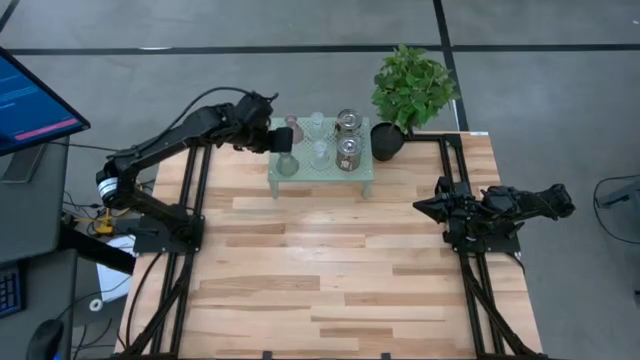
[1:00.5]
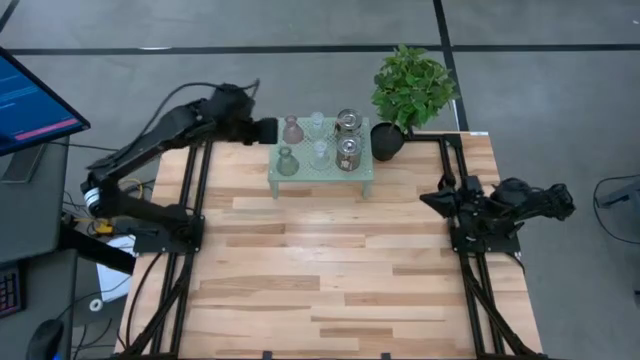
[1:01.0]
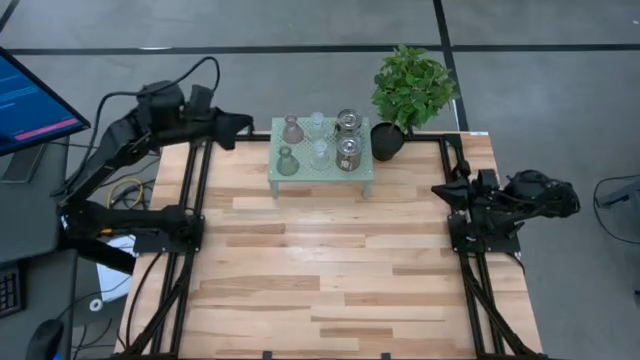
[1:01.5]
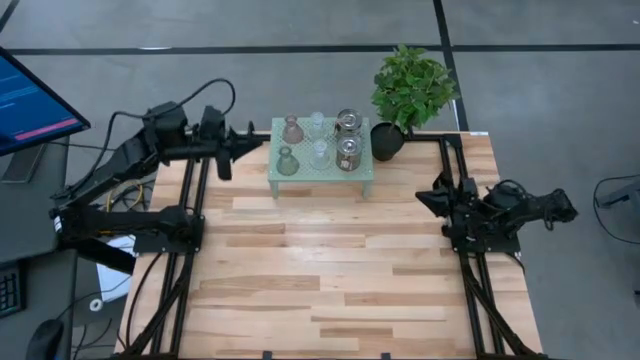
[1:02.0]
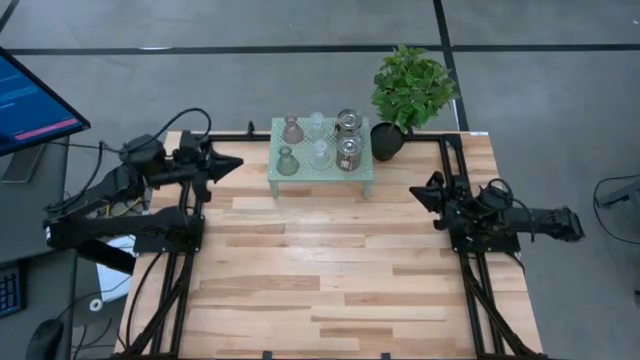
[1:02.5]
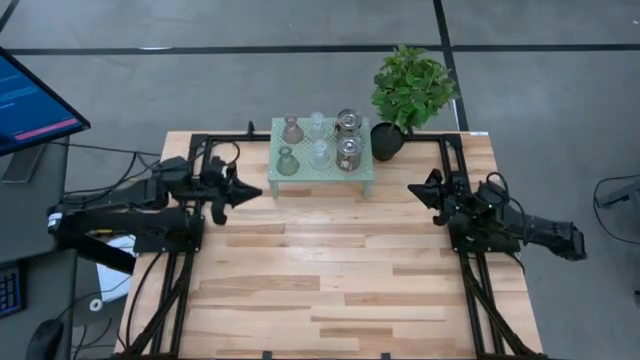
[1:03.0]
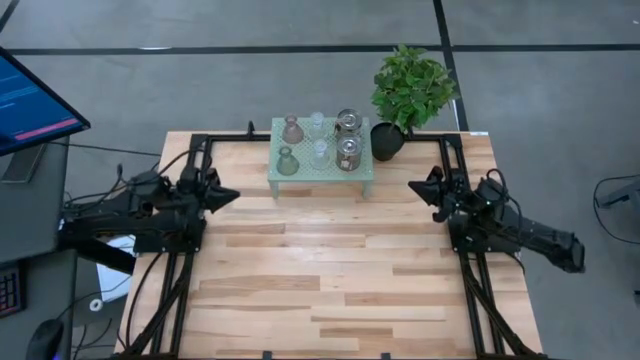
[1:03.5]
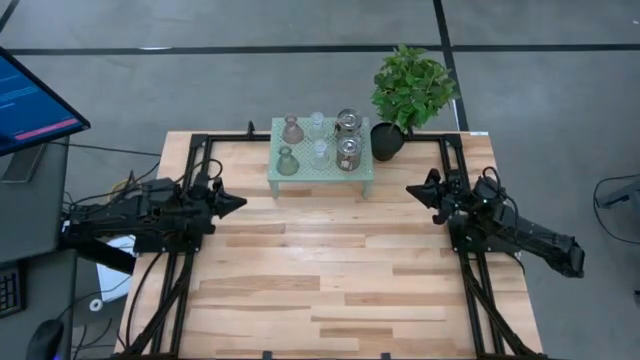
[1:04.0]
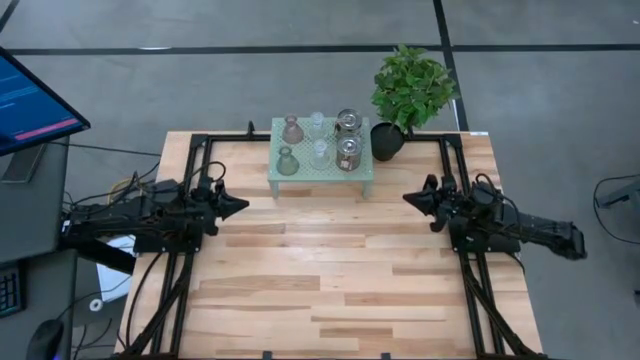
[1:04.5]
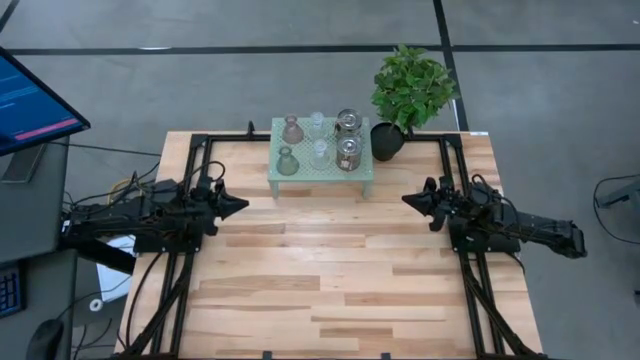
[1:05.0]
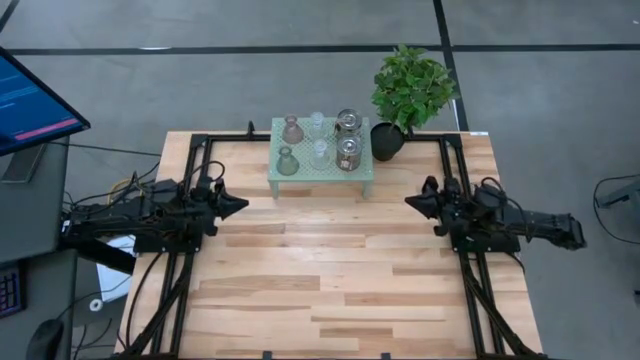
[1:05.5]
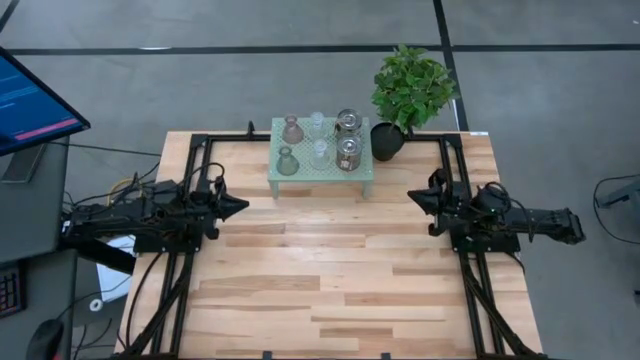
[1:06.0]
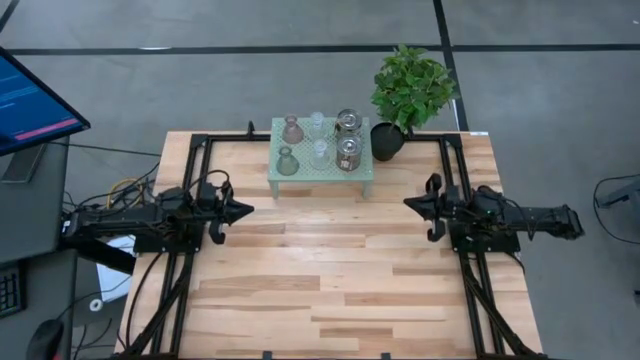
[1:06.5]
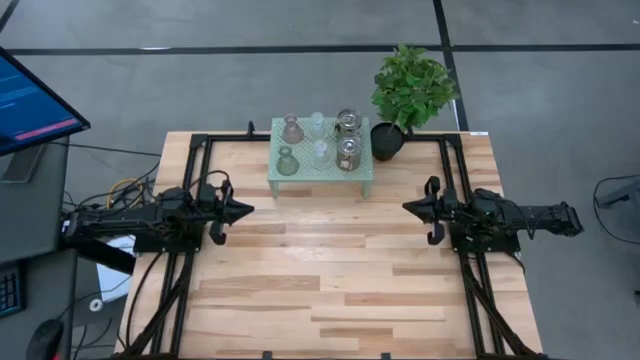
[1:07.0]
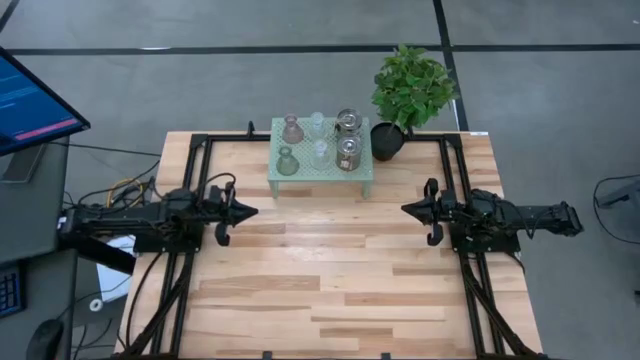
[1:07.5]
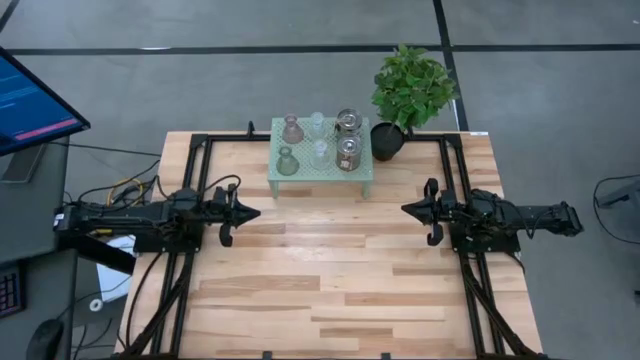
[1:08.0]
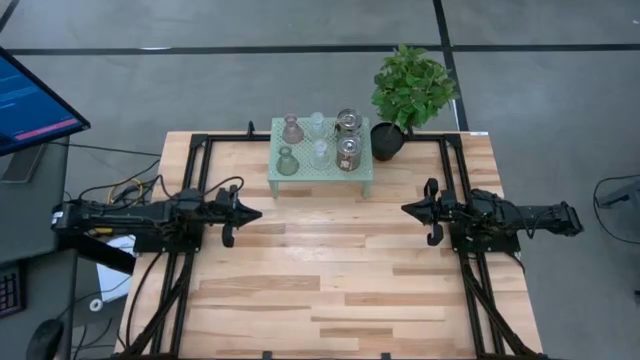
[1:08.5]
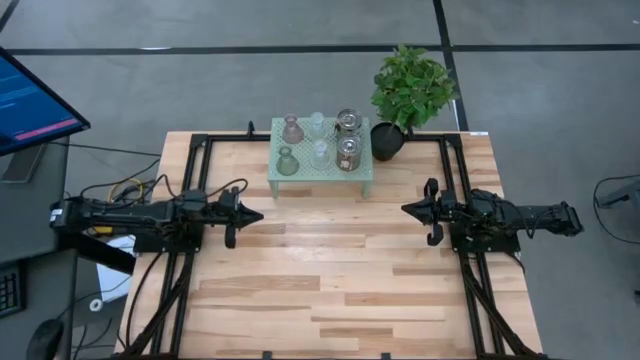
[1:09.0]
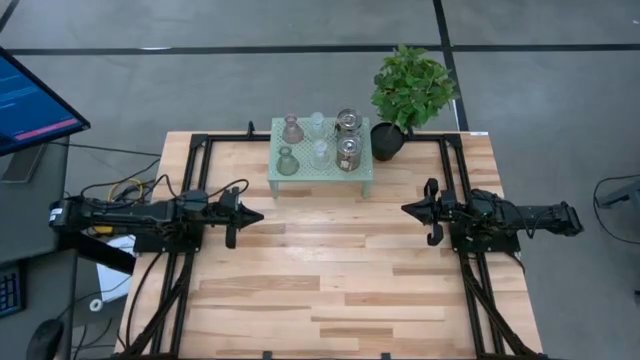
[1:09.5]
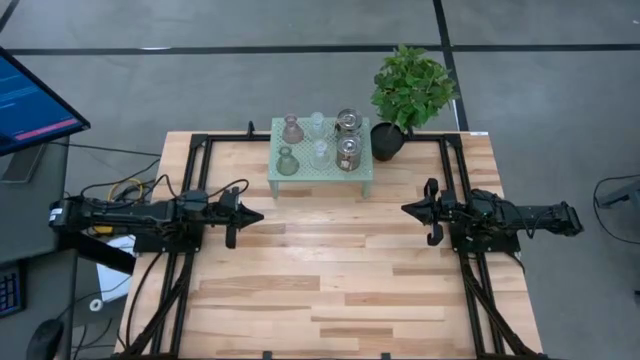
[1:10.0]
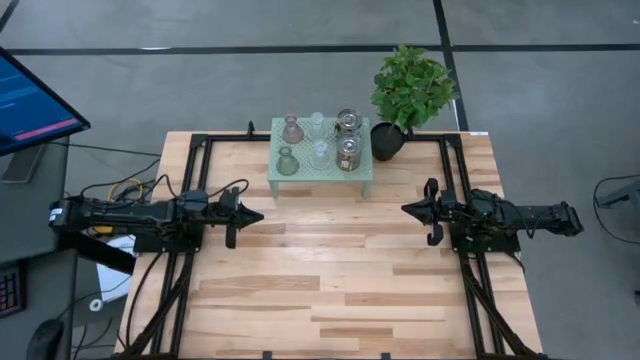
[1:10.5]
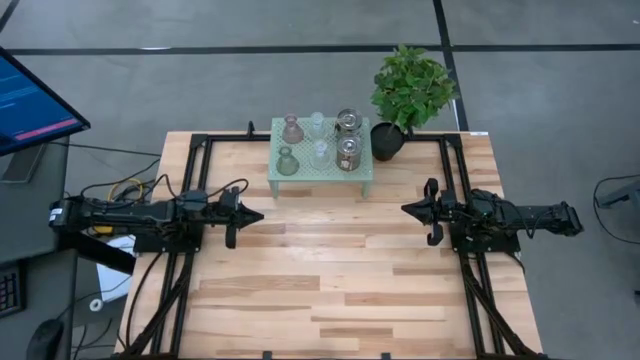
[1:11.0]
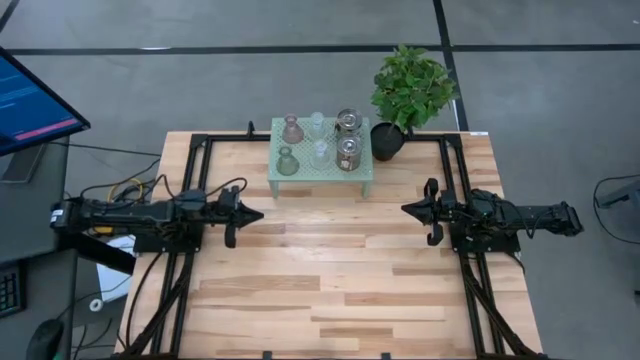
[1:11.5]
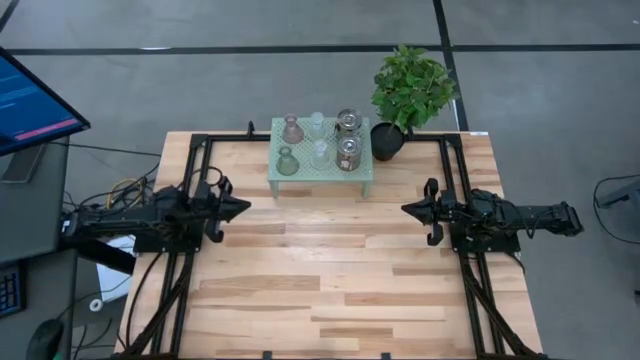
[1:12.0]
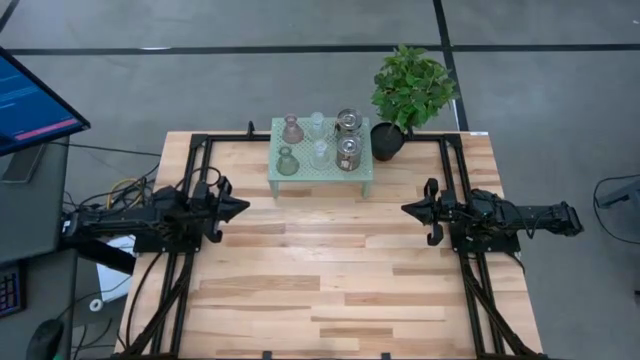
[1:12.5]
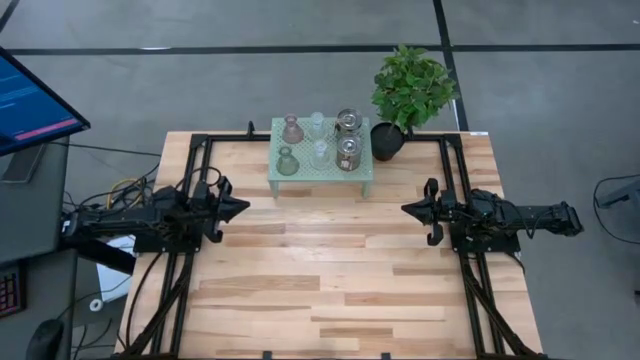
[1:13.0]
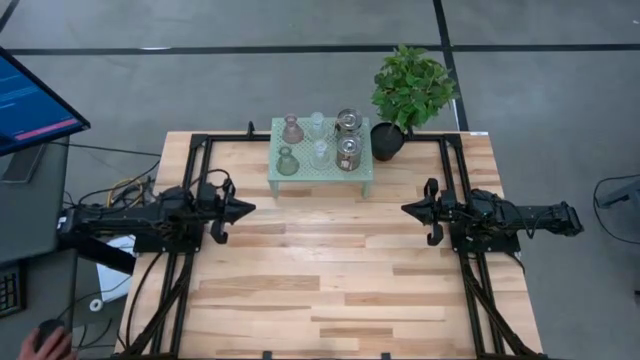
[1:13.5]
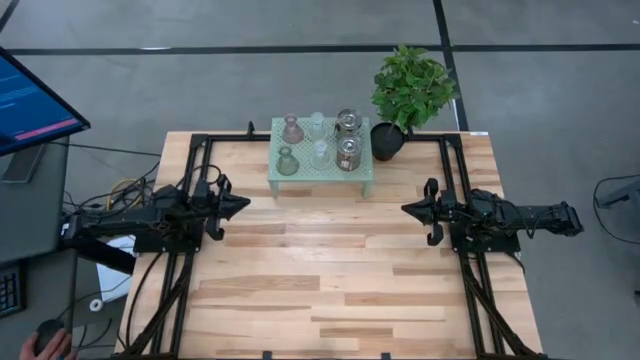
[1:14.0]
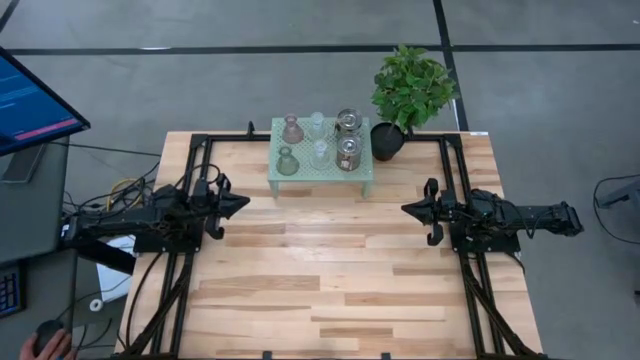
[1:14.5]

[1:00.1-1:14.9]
Task: Pick & Place candle stick holders
Return to Home Position

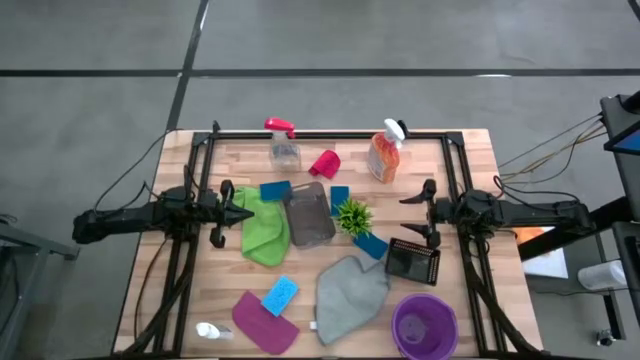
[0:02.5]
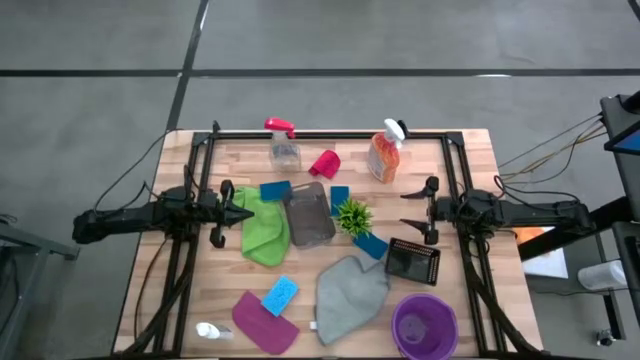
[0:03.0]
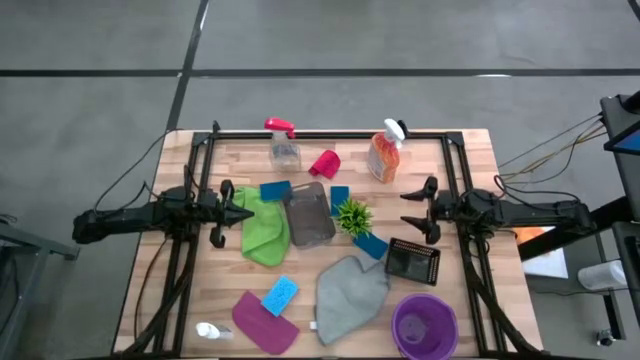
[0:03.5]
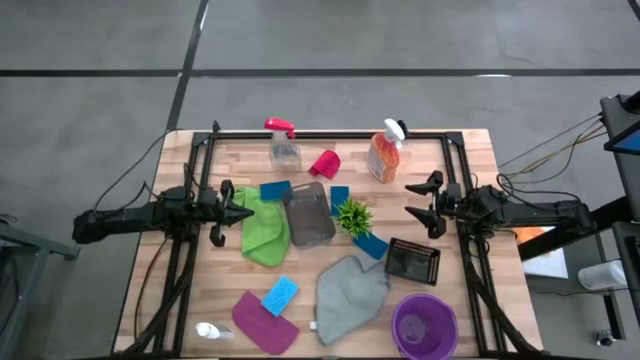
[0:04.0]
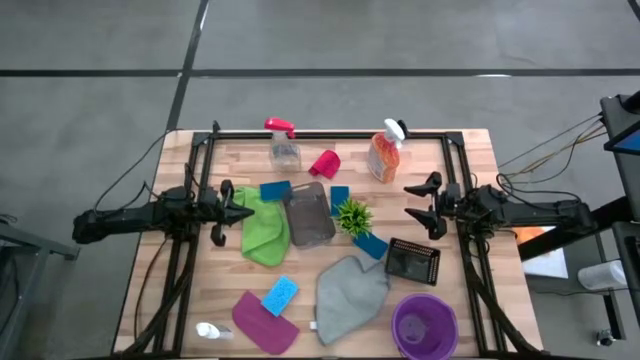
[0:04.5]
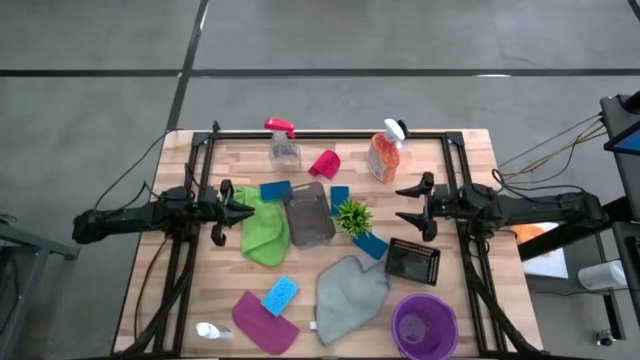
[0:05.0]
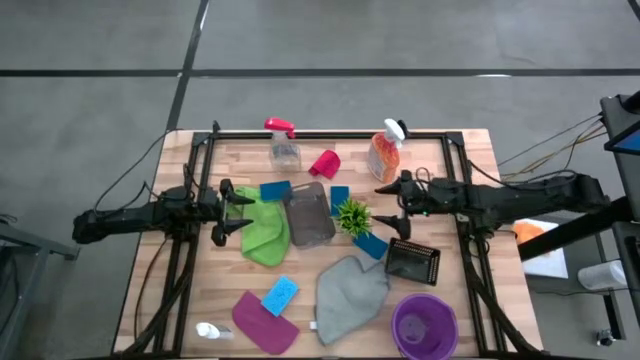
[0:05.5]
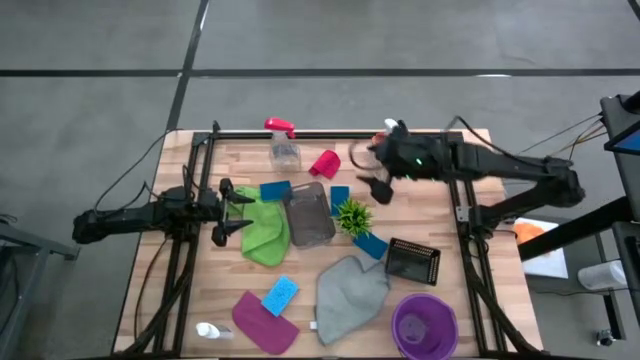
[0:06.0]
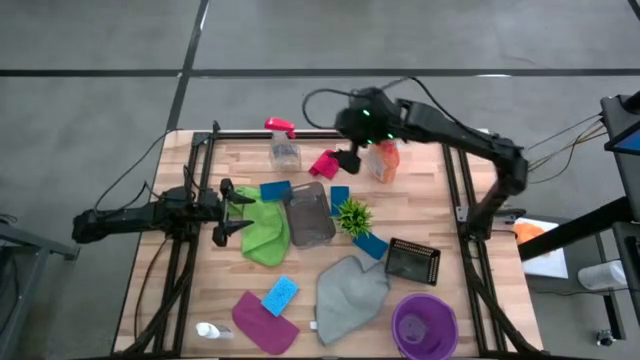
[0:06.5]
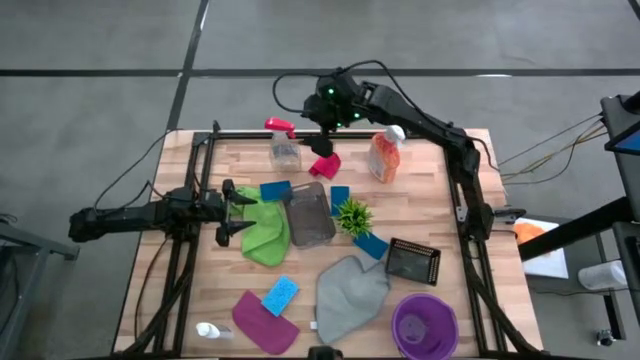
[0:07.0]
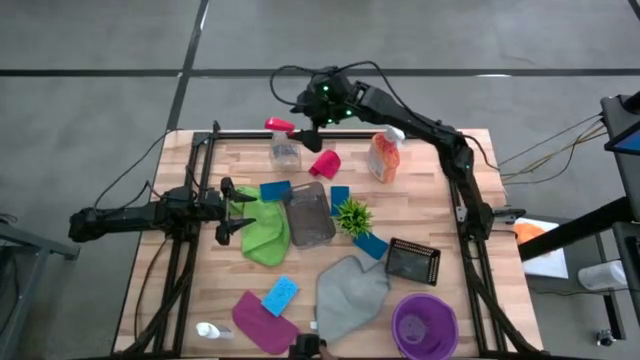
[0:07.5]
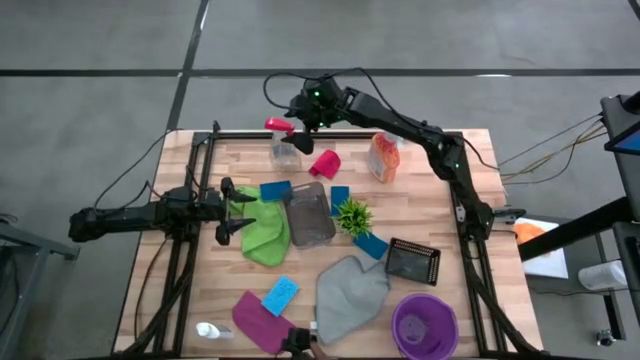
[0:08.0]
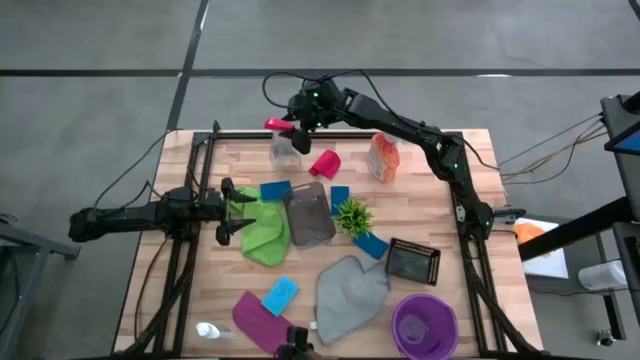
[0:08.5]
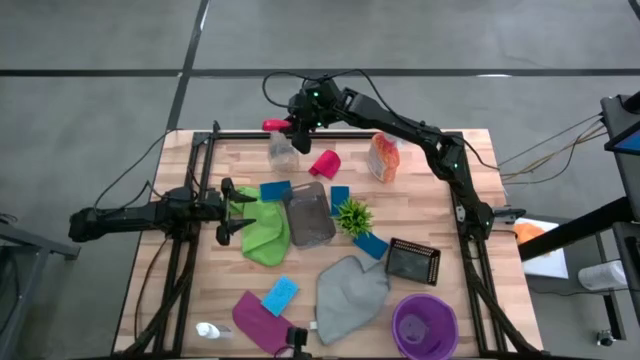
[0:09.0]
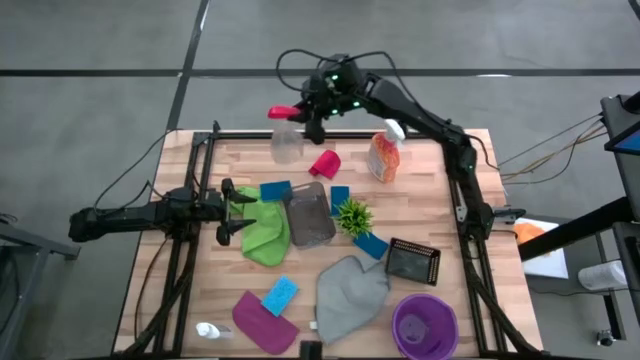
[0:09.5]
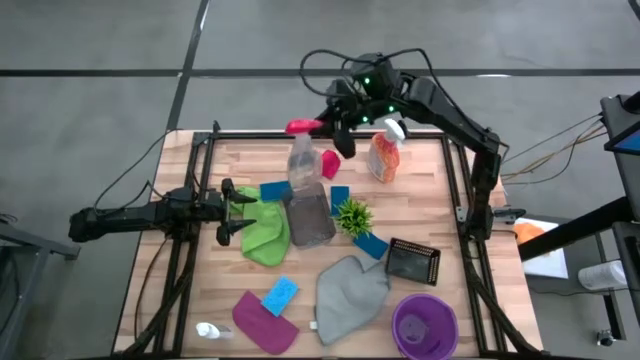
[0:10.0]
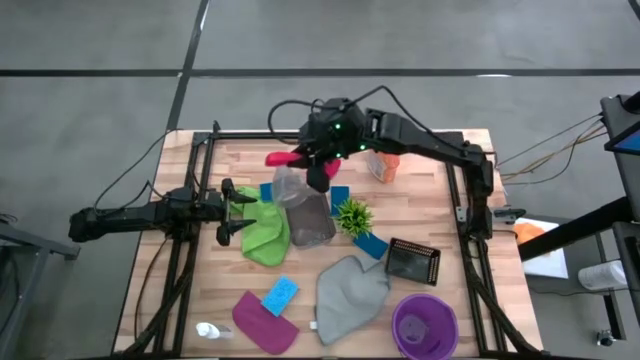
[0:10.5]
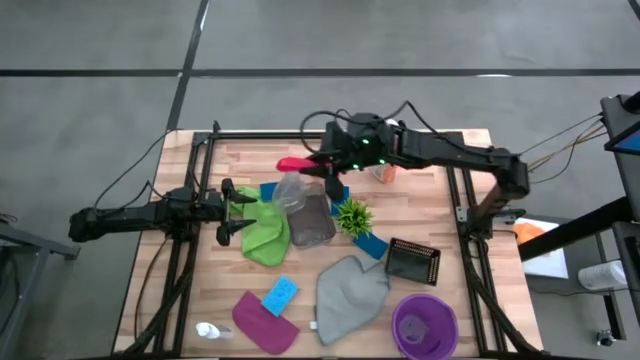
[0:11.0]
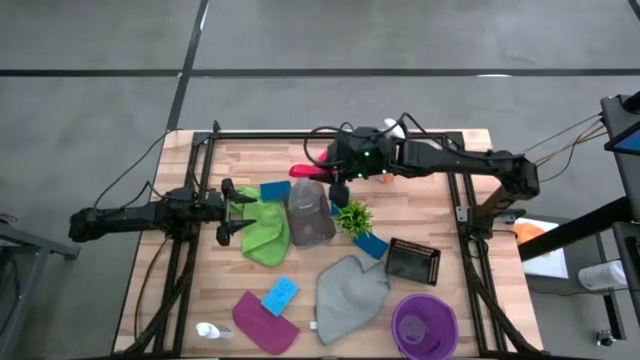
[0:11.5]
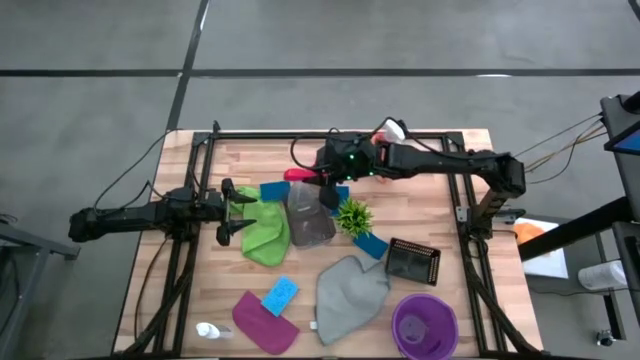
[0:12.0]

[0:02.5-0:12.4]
Task: Pick & Place Kitchen Items
Put the transparent spray bottle into the transparent black bin
